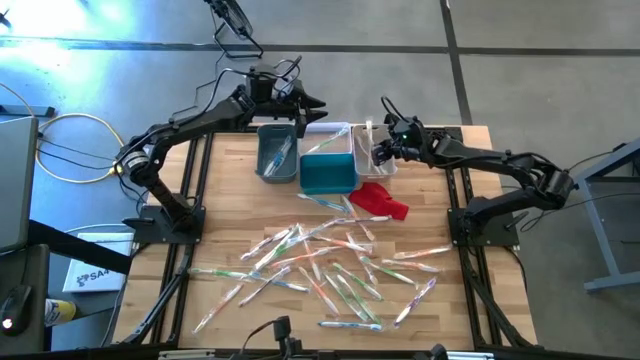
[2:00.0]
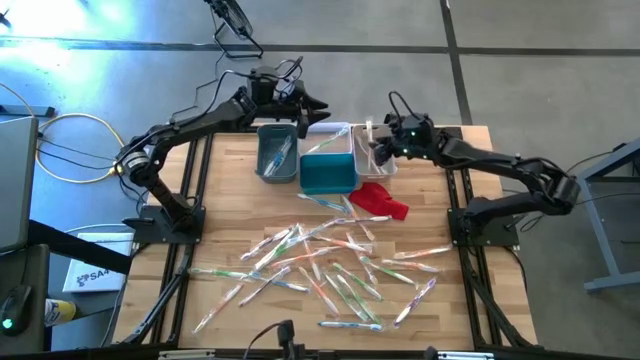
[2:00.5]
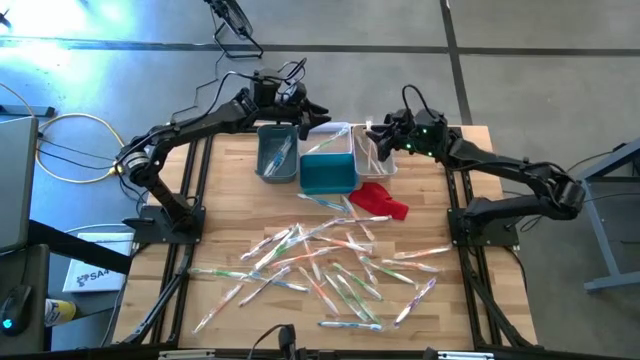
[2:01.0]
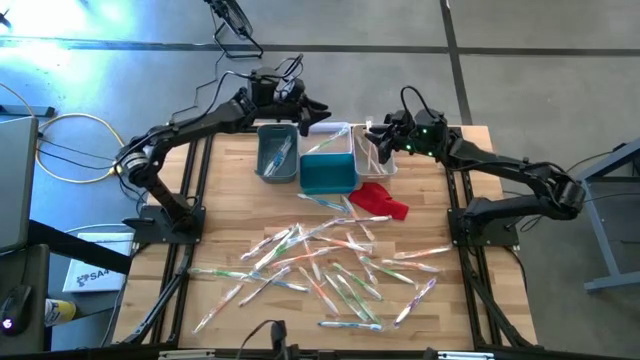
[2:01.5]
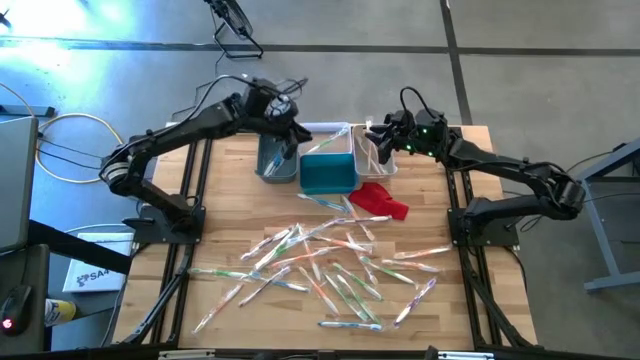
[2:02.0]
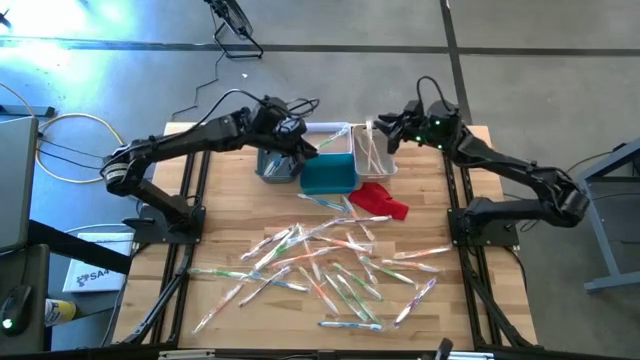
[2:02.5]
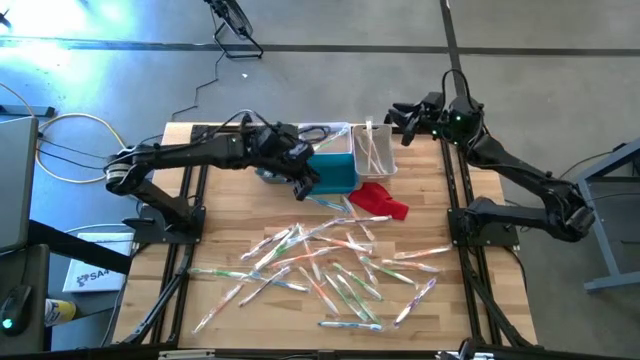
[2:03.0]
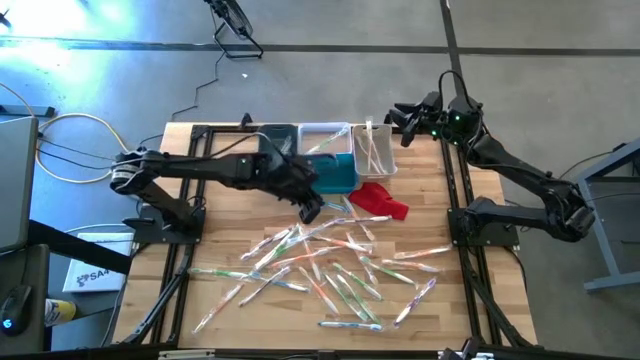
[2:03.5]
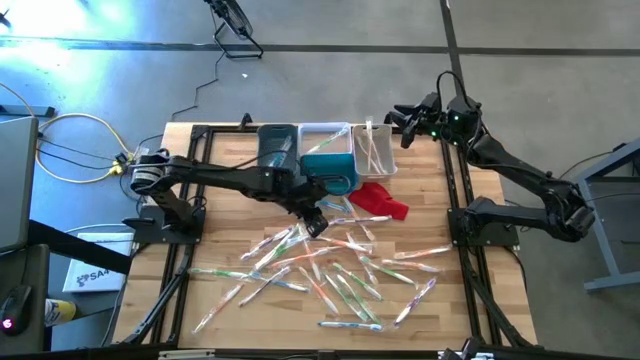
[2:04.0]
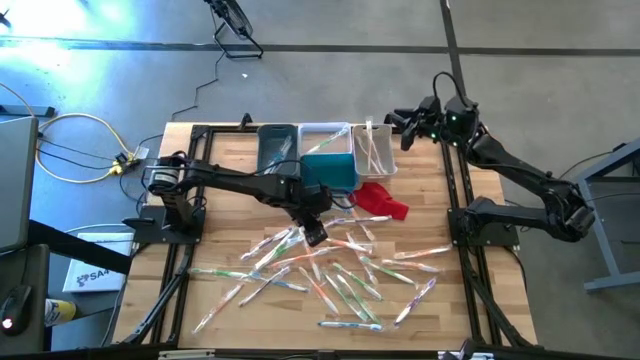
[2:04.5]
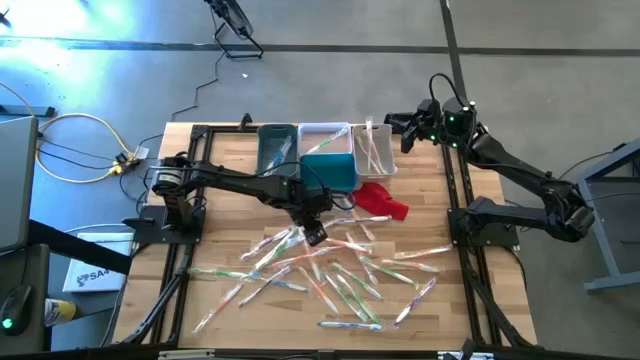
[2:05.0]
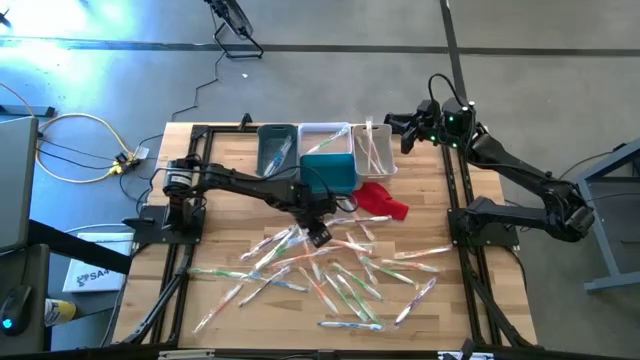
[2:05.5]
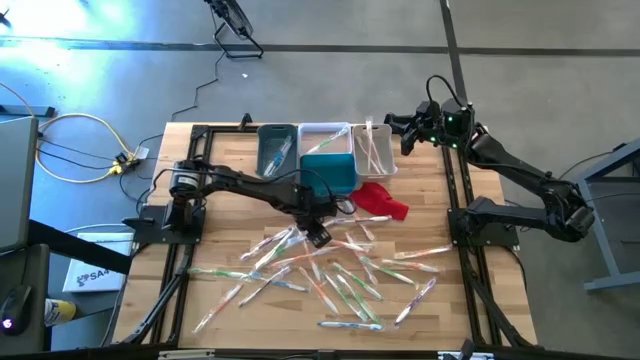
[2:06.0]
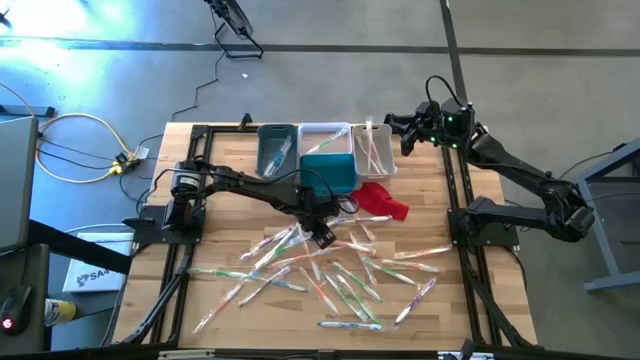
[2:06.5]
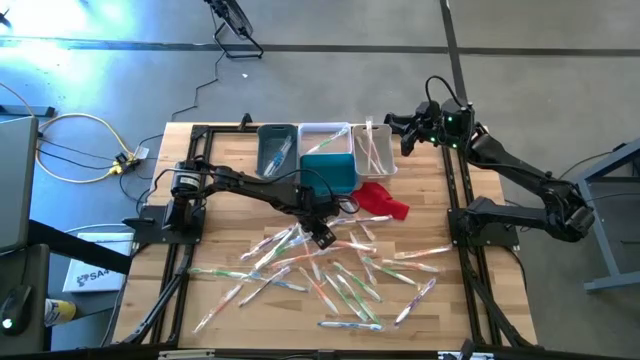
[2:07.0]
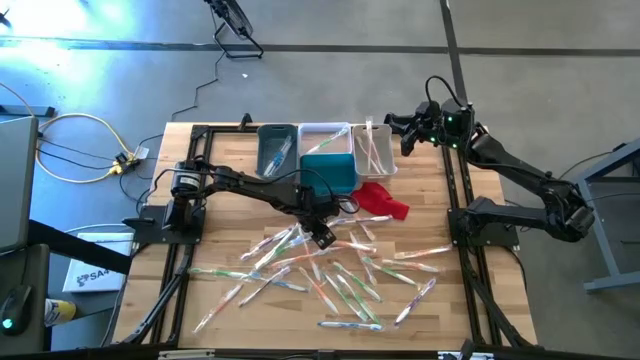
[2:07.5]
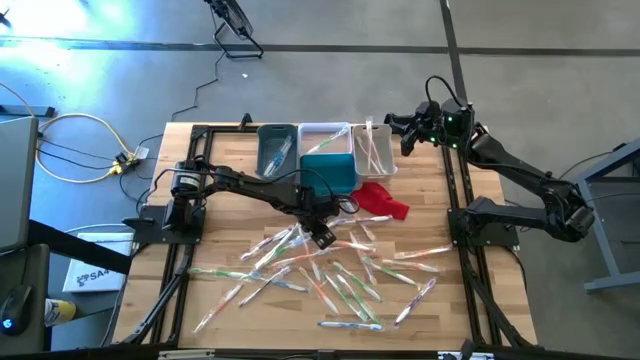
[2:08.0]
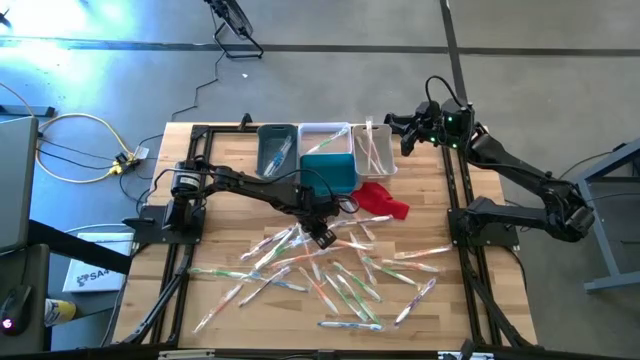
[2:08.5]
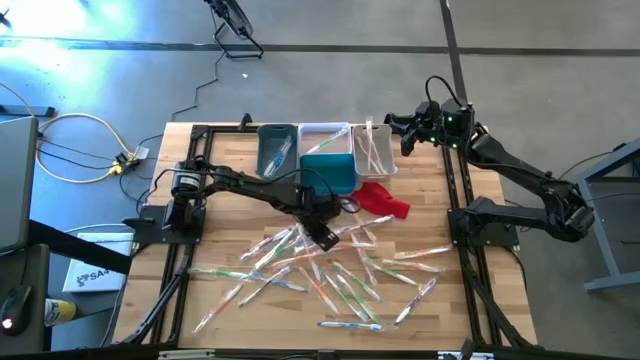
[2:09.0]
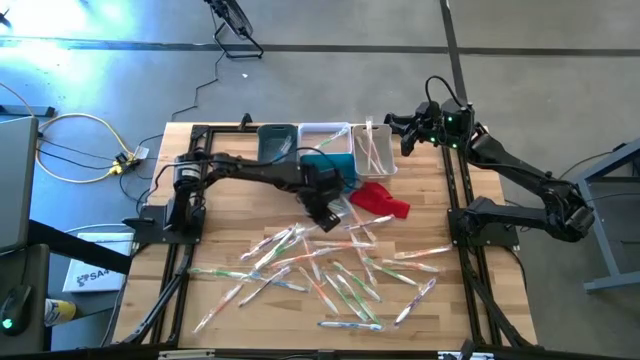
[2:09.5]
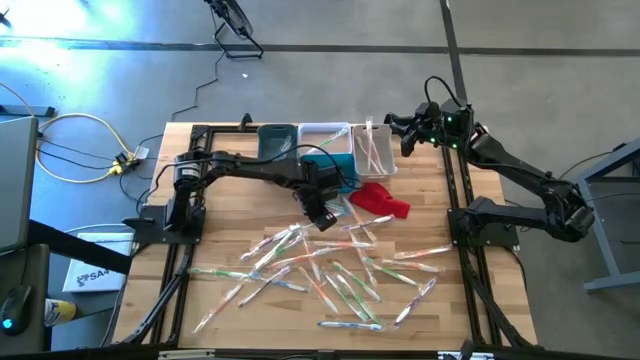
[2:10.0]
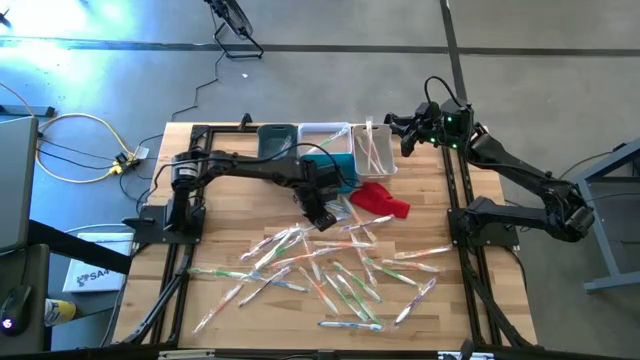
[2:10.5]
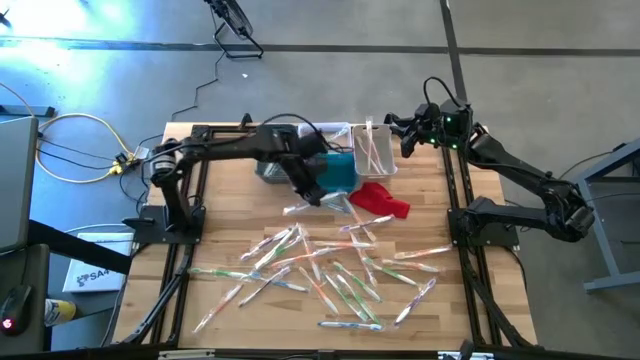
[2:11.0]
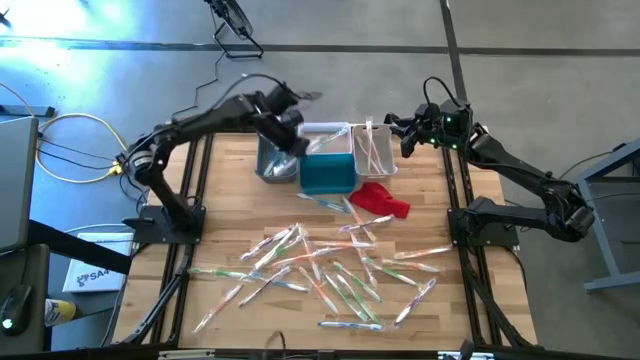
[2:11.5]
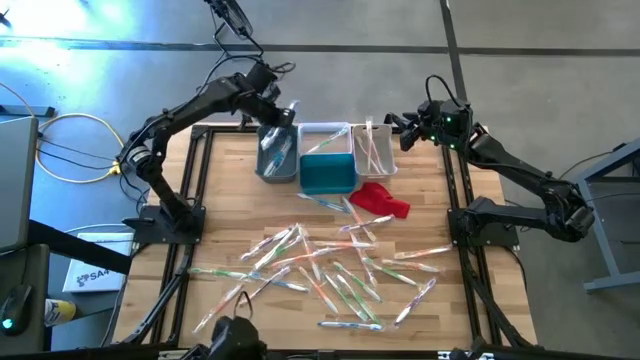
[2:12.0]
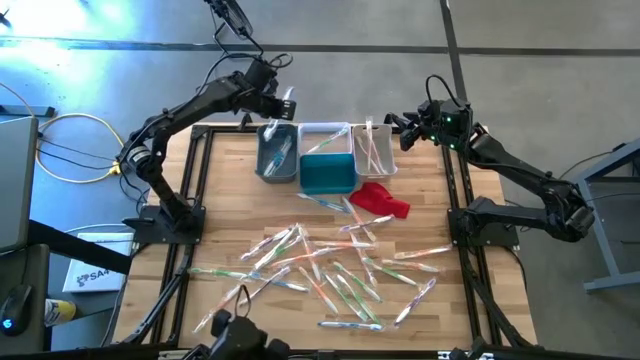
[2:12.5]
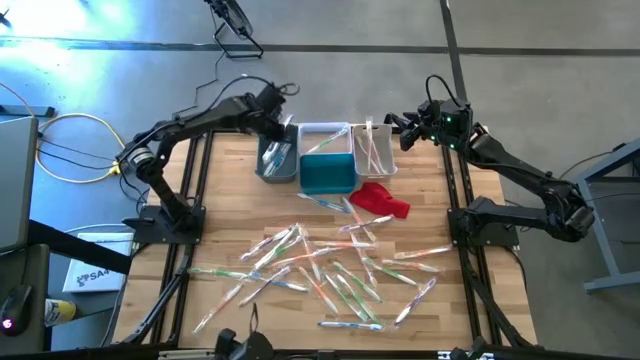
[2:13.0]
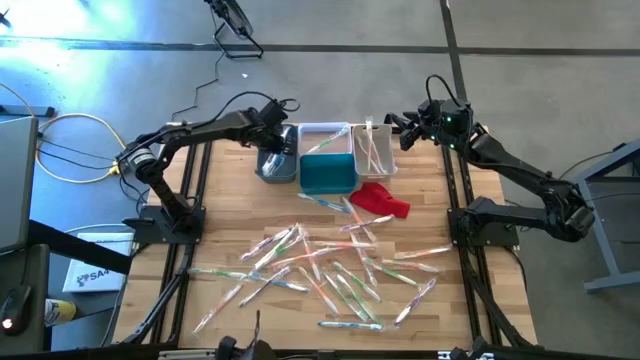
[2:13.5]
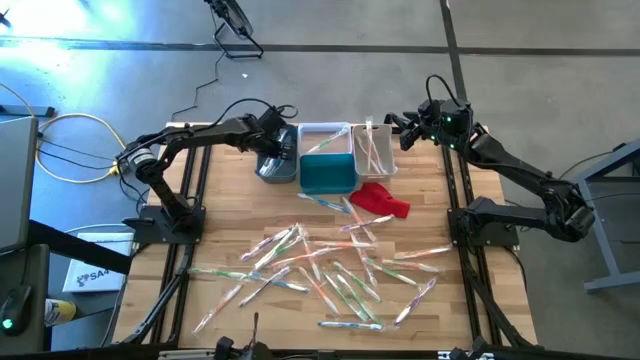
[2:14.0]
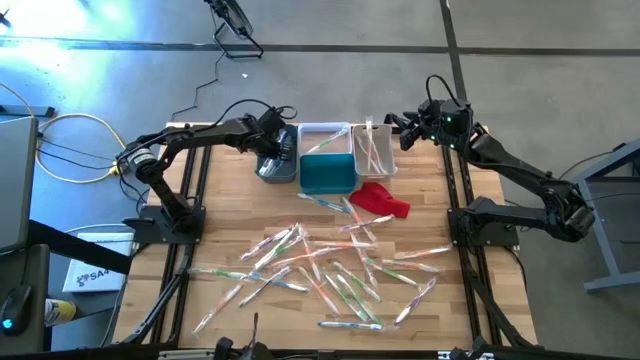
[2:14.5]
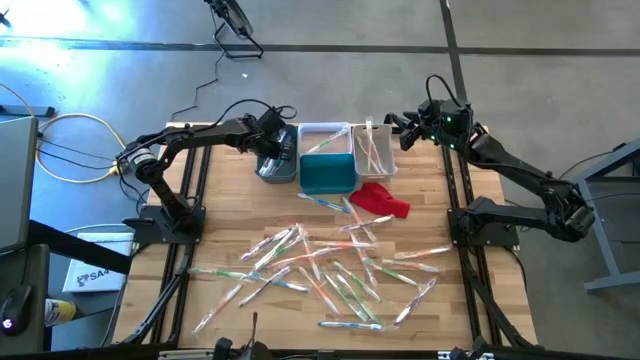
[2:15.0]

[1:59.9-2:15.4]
Task: Pick & Place Toothbrushes
Put the blue toothbrush into the gray bin

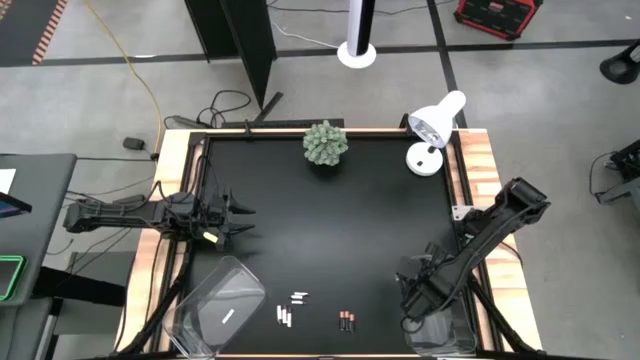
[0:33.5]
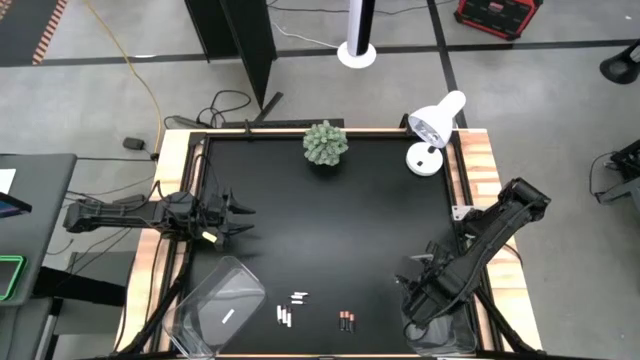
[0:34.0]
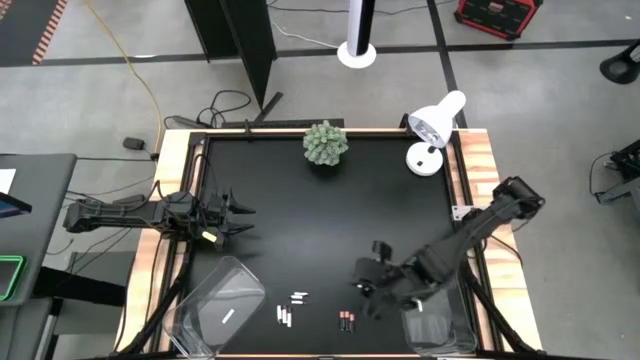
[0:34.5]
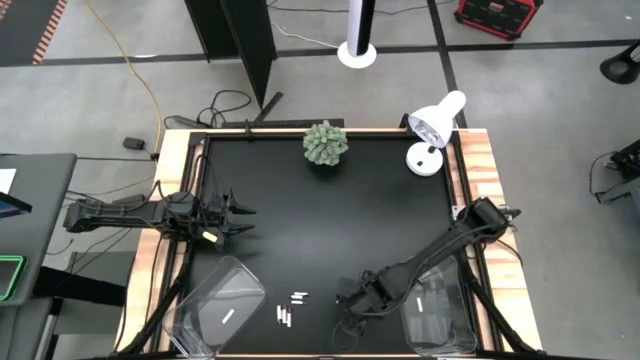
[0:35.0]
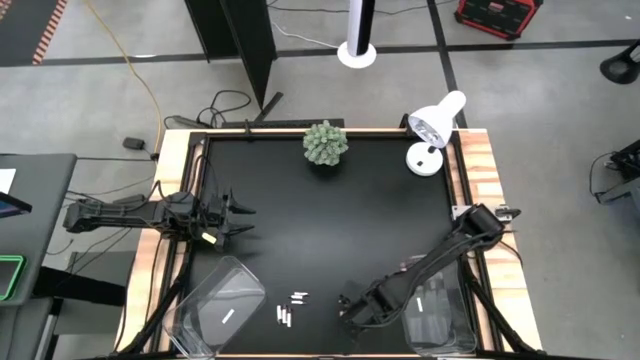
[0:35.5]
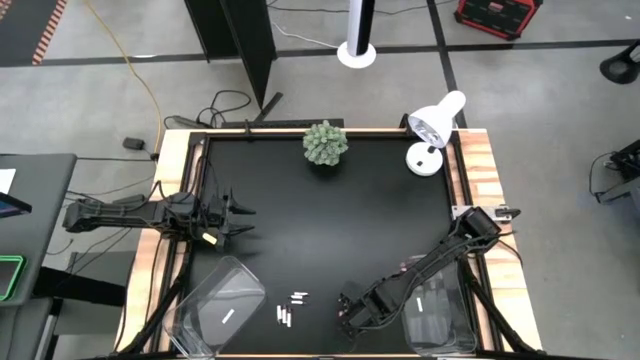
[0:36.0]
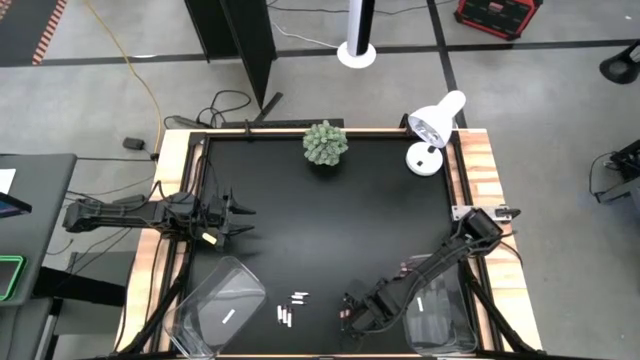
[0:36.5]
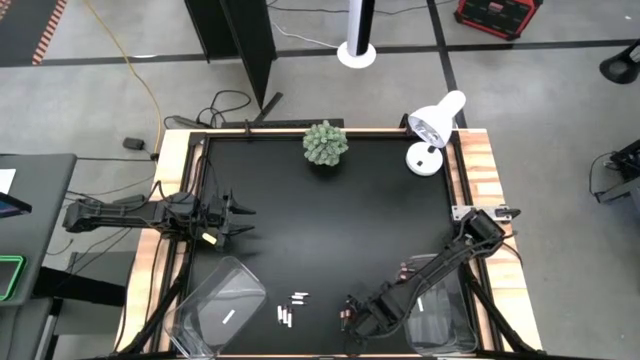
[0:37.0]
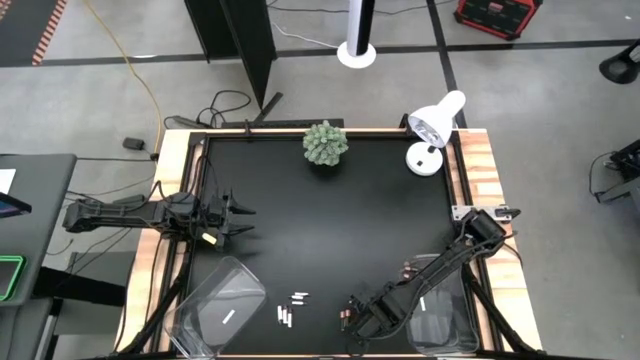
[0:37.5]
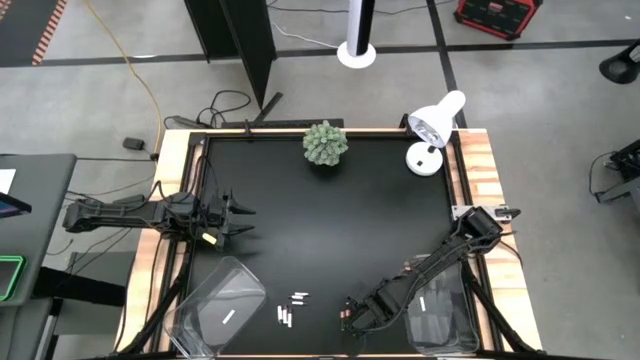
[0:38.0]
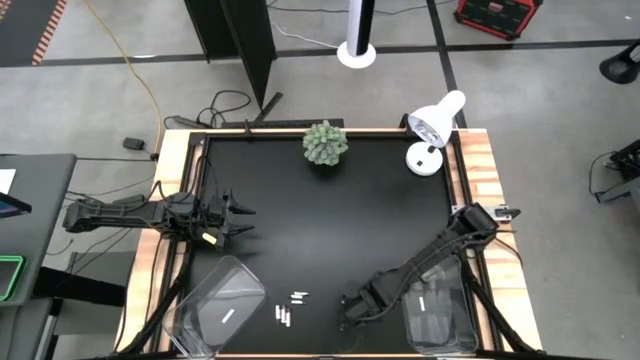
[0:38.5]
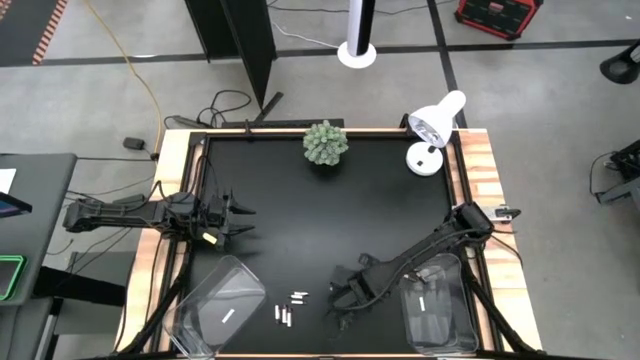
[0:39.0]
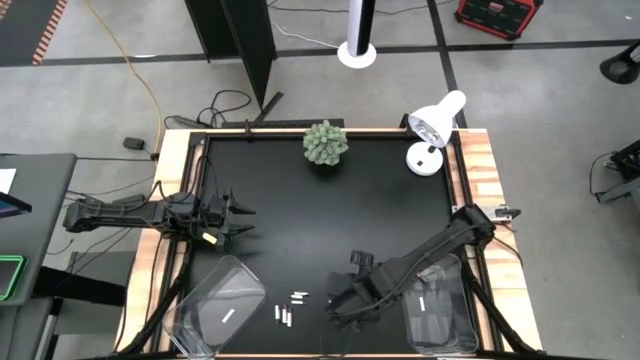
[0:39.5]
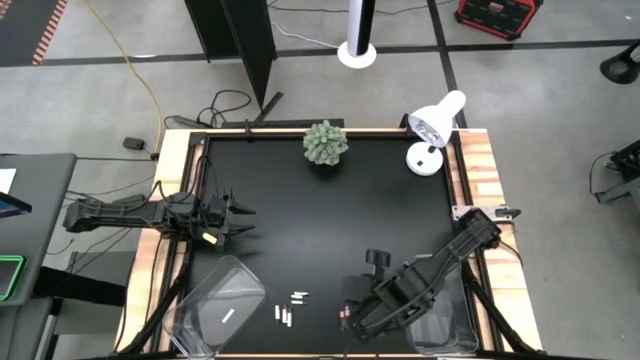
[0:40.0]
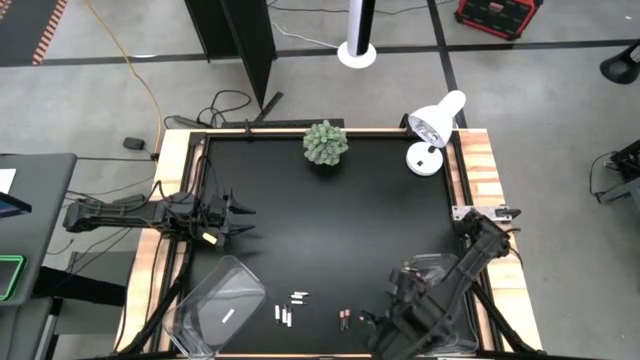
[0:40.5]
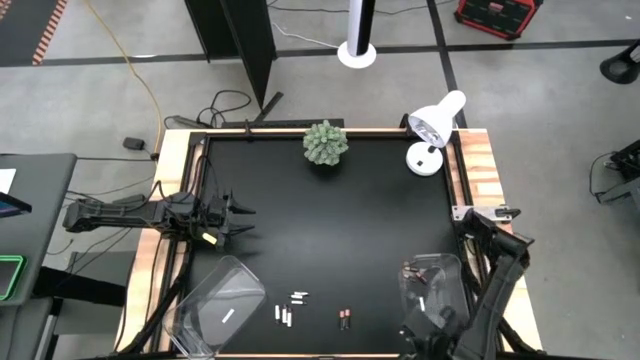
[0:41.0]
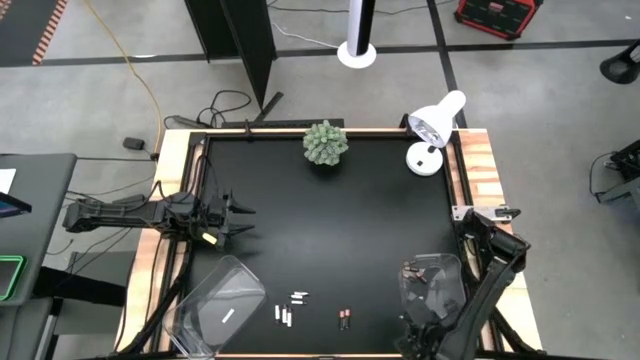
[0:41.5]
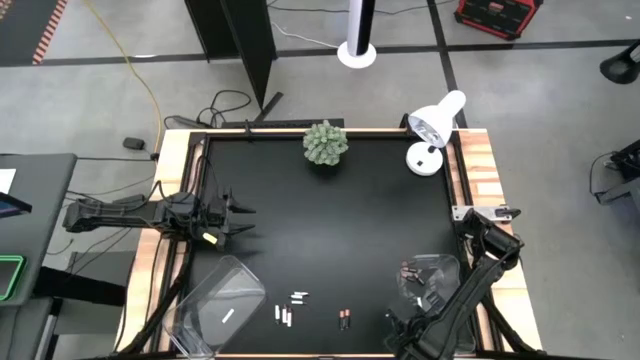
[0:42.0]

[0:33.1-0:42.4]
Task: Sort batteries
Put the black battery into the right transparent bin
